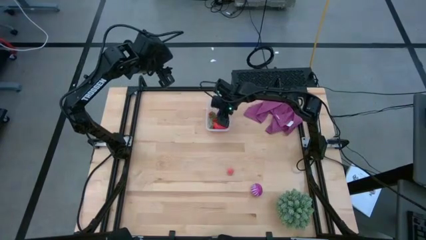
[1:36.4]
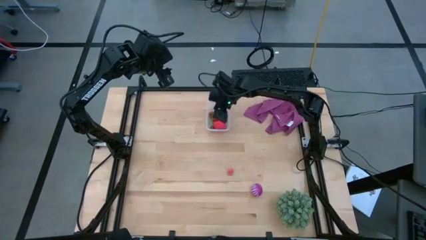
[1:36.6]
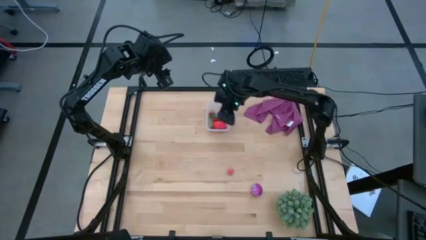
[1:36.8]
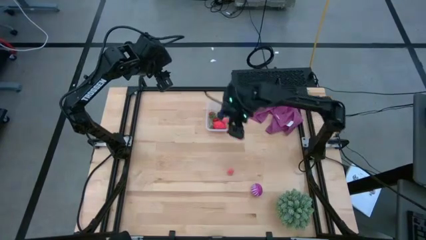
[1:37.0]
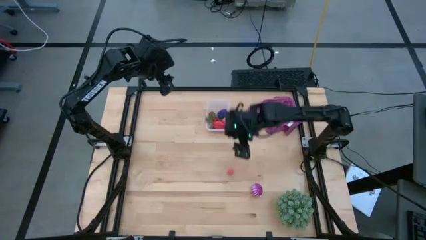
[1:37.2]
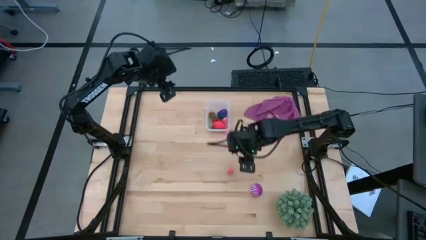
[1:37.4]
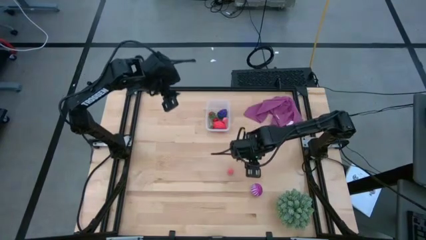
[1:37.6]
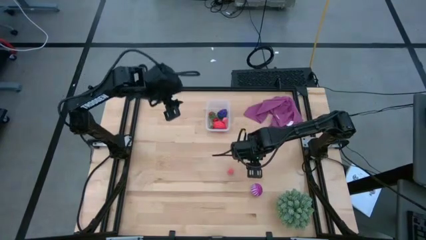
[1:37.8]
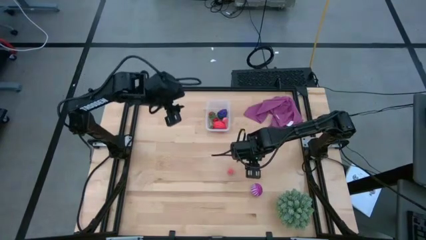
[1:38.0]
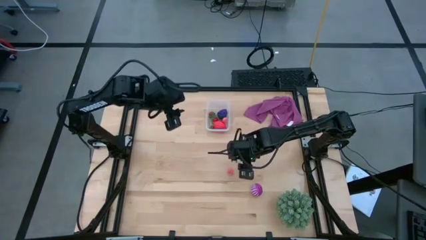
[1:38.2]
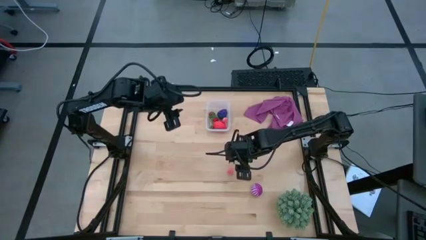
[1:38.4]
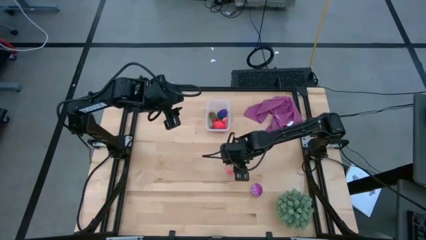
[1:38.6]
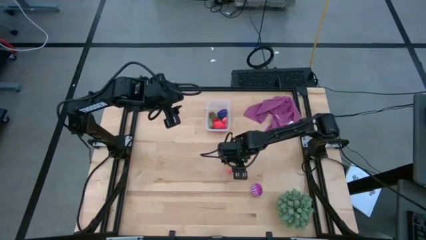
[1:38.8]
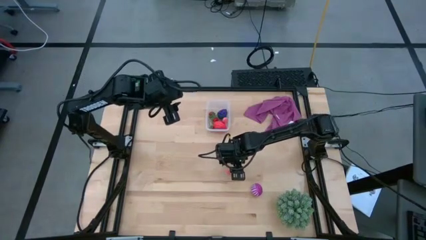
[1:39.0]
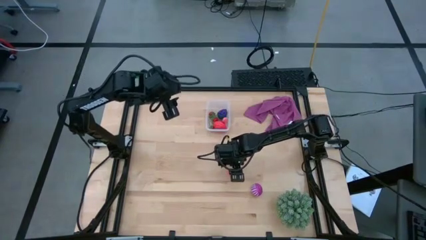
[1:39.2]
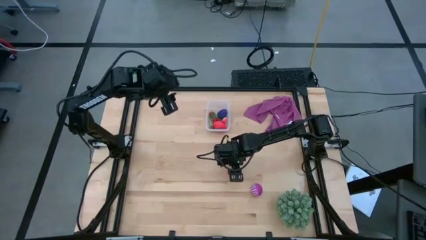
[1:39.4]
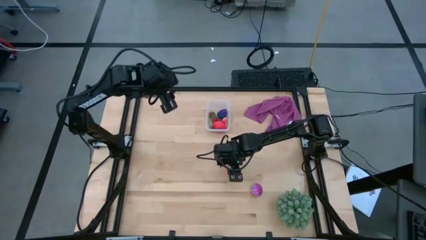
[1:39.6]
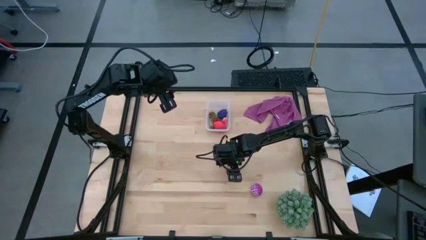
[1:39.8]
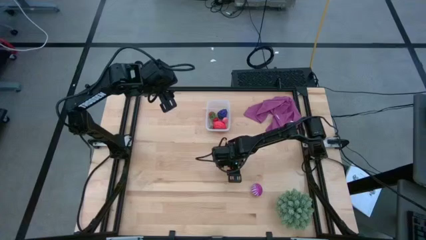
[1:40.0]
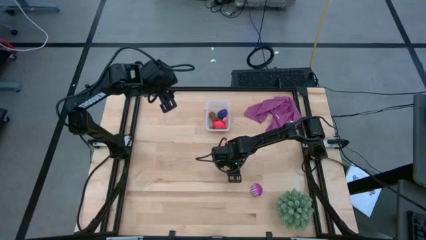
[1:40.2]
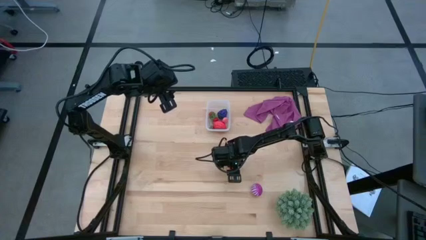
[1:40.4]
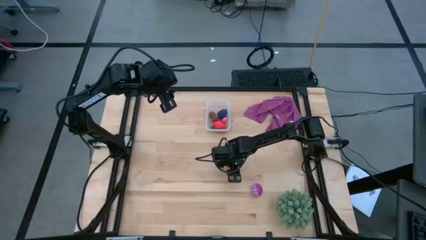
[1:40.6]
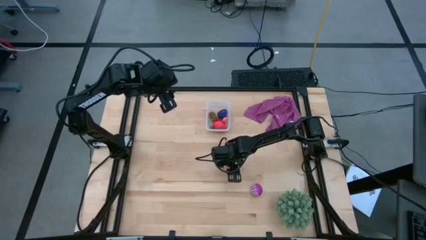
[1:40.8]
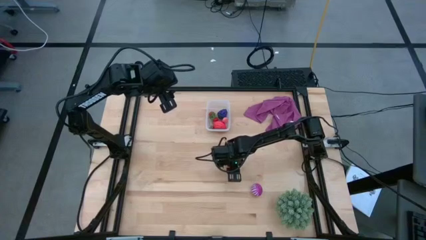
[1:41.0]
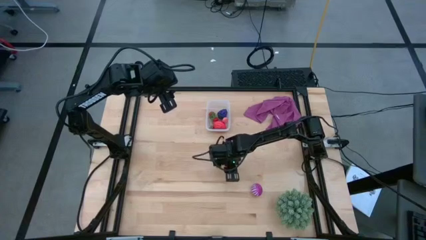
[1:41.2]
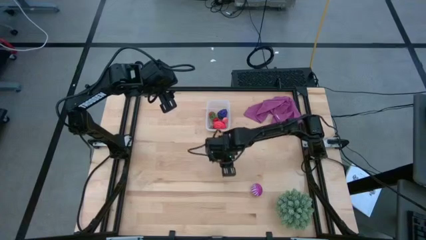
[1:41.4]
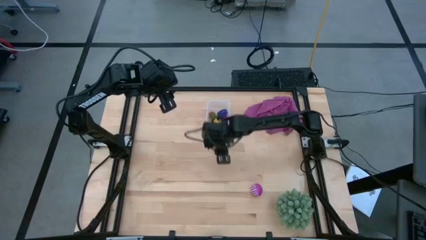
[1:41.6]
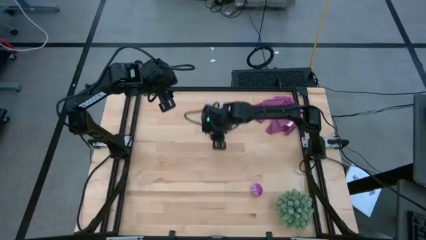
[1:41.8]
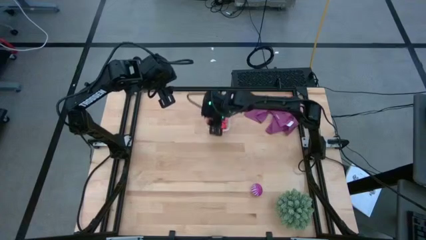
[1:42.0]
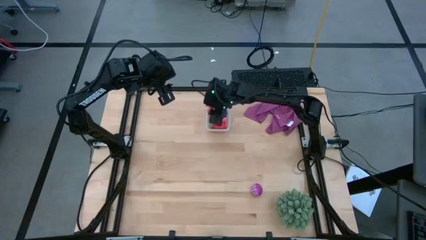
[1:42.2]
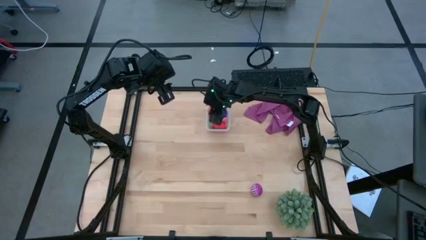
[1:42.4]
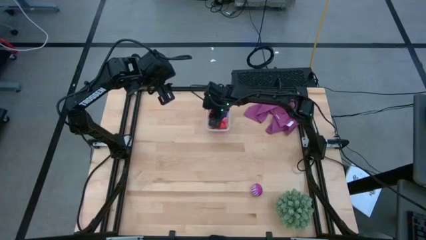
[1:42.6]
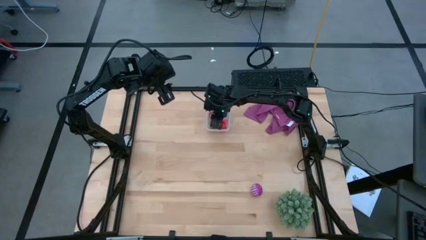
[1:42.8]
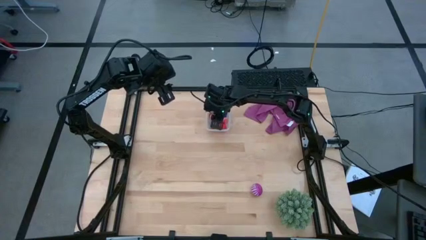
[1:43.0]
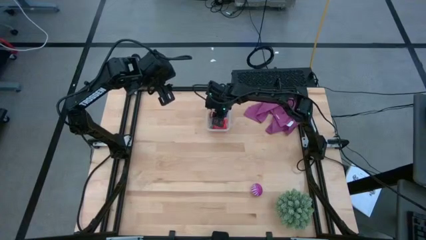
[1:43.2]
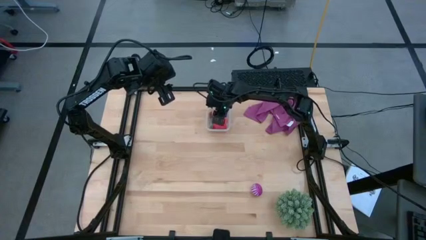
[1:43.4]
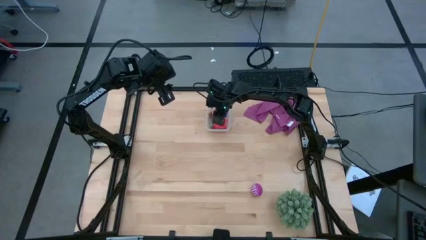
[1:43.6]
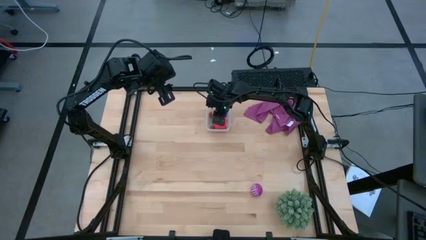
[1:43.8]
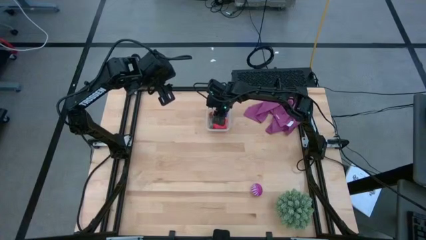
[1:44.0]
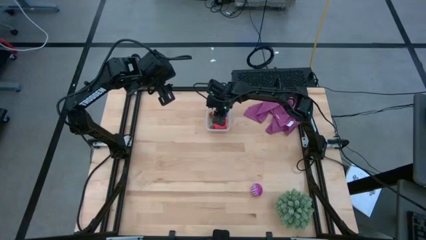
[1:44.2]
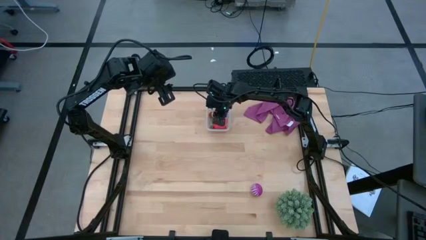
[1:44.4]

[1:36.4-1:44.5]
Task: Pick and placing Produce into tupperware
Put the pink peach into the transparent bin

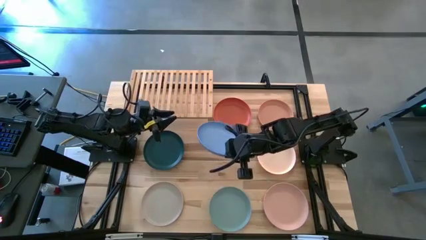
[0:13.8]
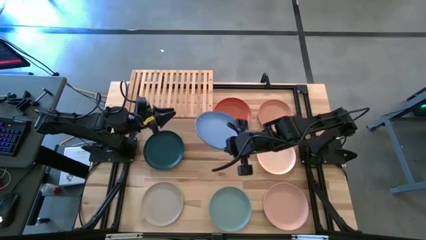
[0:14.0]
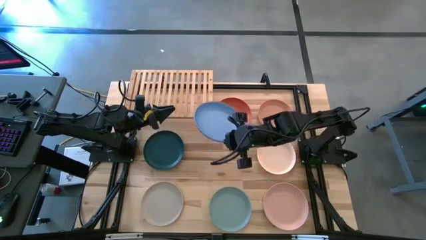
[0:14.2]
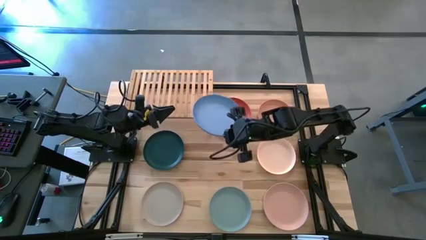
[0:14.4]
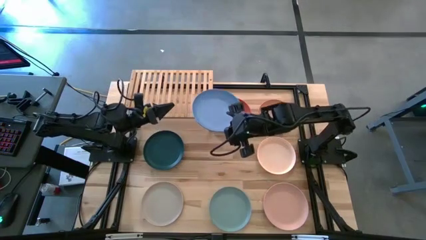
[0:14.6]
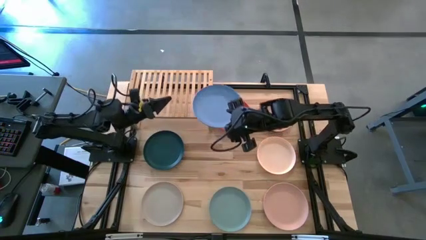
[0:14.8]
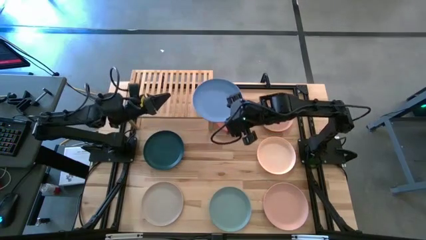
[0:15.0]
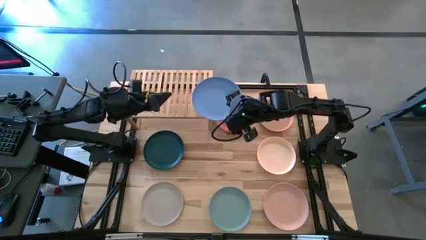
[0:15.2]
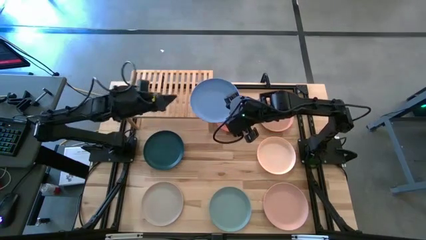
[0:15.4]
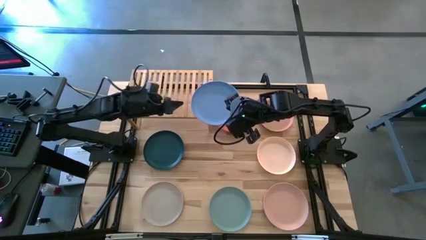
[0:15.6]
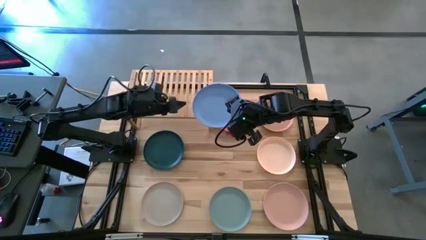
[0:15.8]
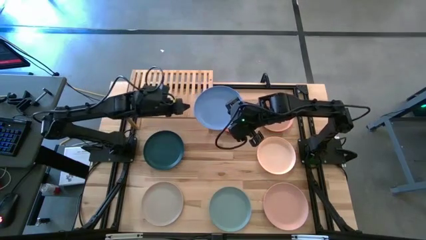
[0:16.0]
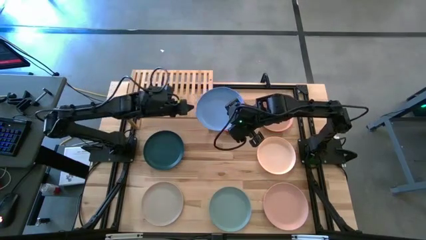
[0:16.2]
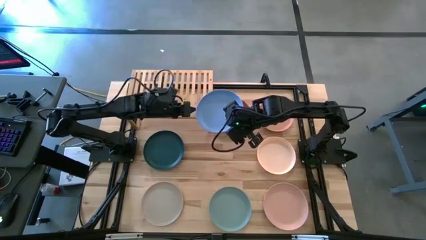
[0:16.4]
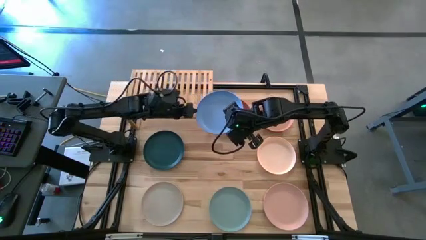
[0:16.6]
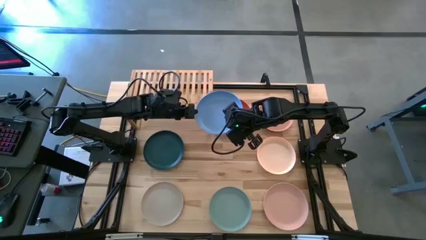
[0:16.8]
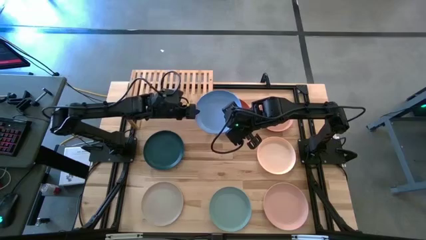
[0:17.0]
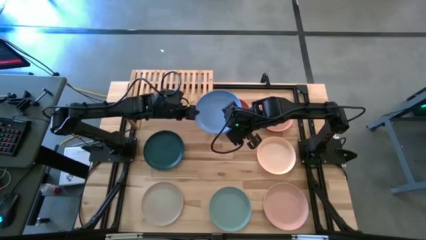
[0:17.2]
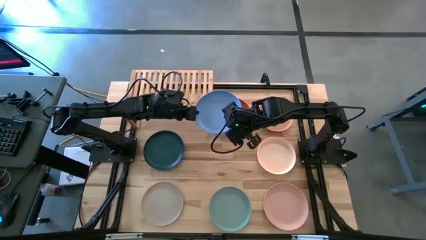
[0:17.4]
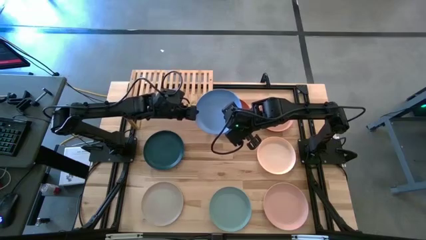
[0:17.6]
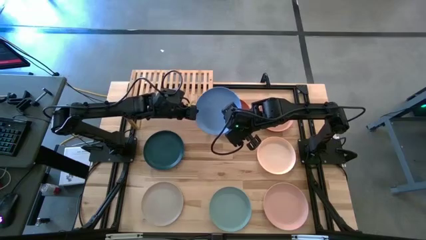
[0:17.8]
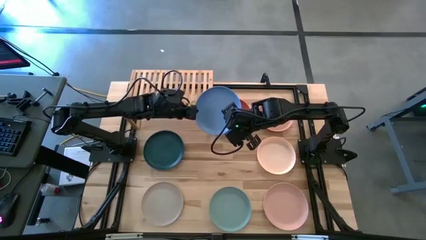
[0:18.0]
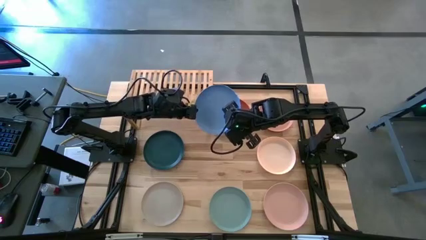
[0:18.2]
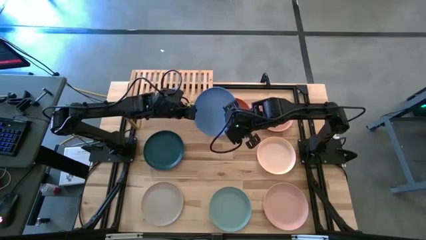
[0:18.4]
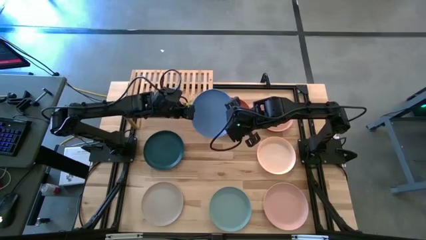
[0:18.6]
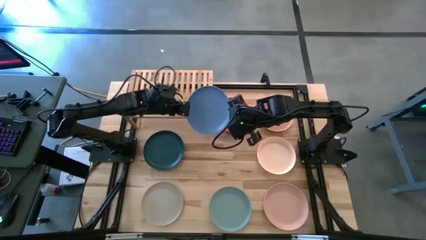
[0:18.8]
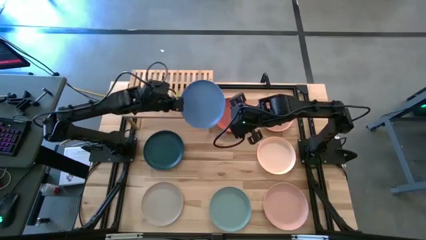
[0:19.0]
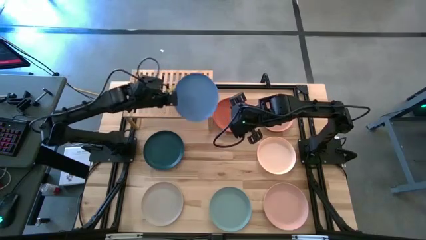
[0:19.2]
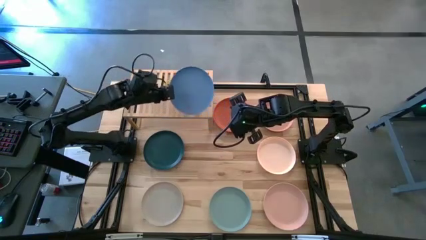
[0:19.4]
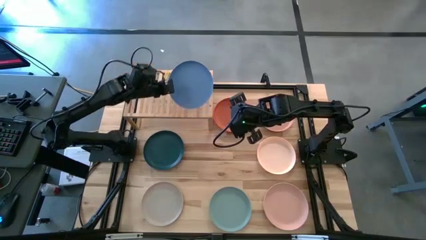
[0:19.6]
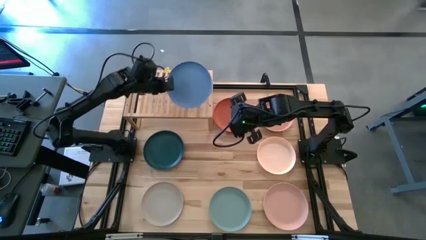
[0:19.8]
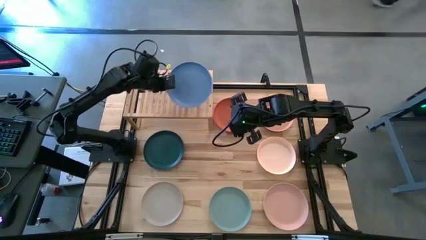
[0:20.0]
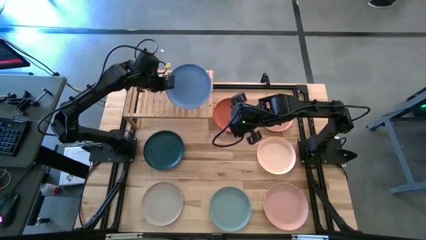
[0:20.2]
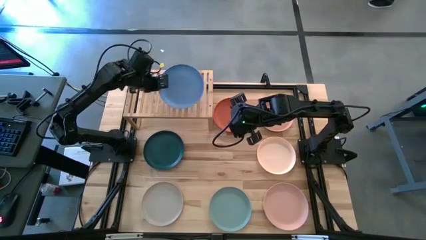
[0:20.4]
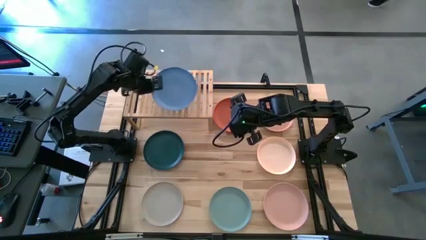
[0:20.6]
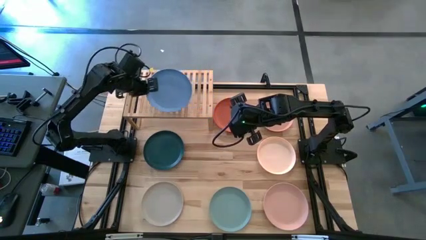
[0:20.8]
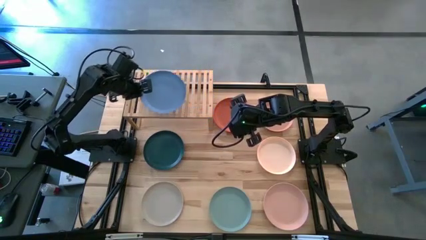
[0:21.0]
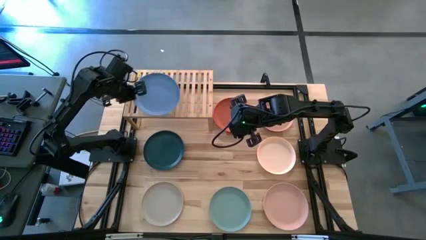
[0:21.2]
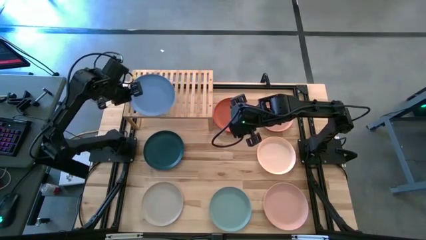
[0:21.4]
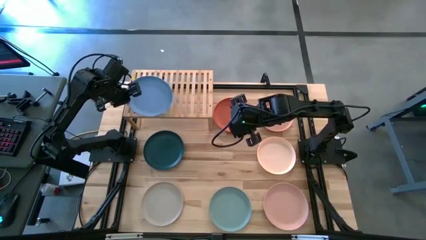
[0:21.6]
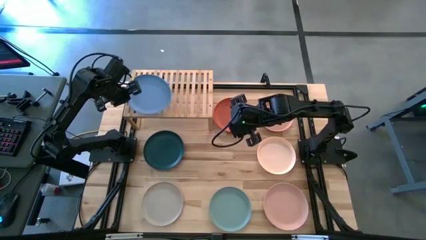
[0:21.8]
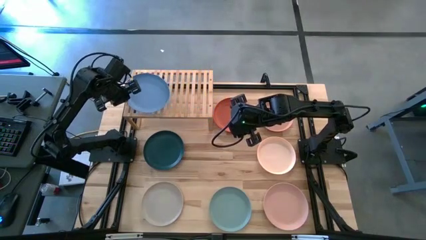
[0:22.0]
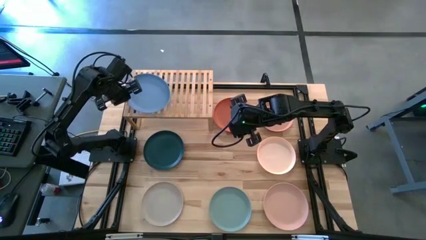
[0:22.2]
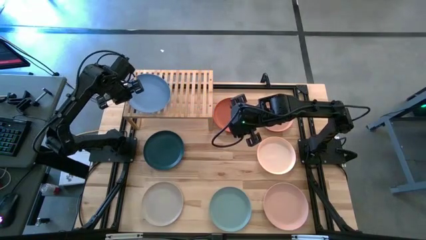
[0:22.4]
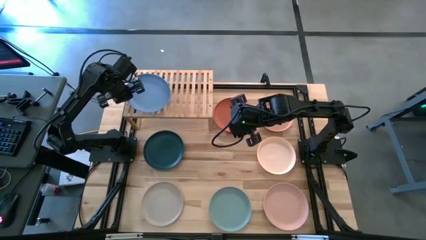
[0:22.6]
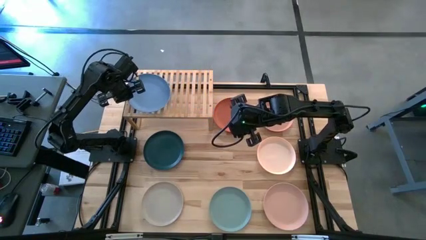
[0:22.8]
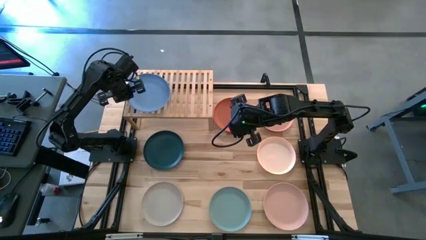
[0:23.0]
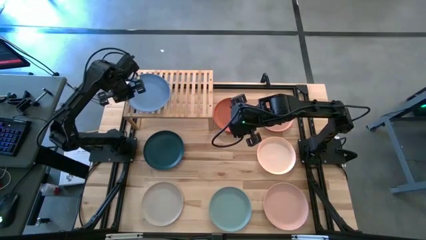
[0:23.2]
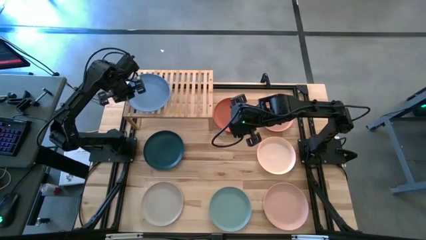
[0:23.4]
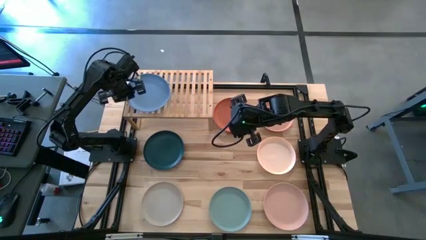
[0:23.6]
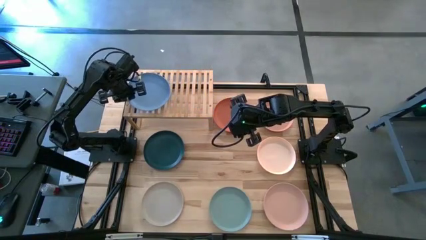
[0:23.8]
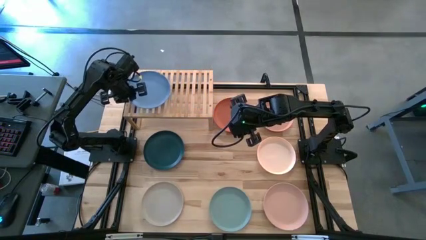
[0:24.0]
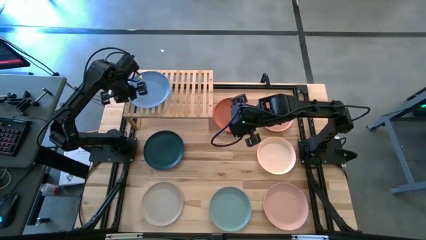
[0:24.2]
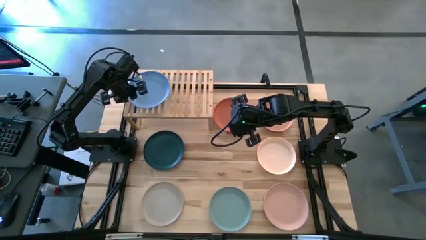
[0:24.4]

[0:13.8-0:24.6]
Task: Place and stack plates onto a shelf
Put the light blue plate on the shelf
